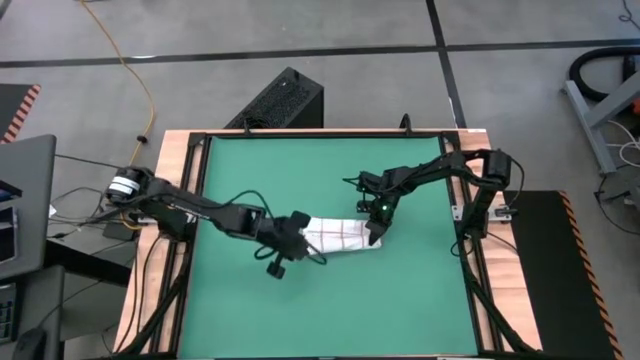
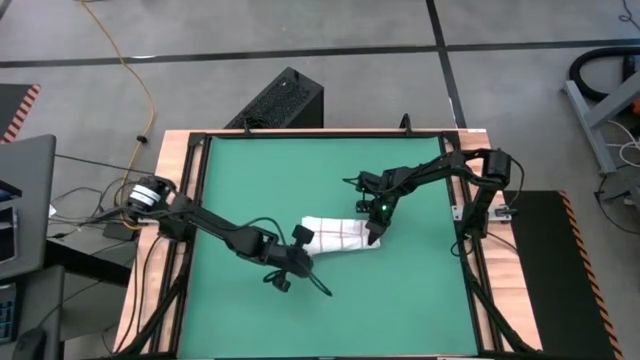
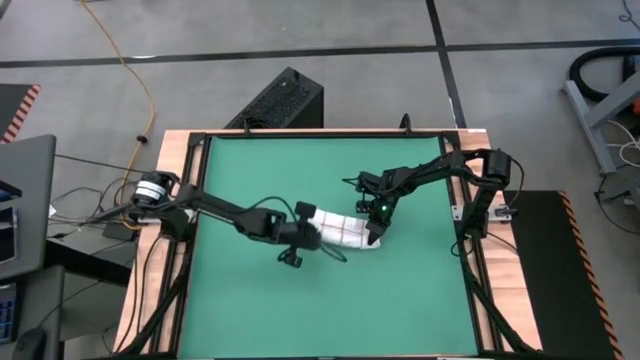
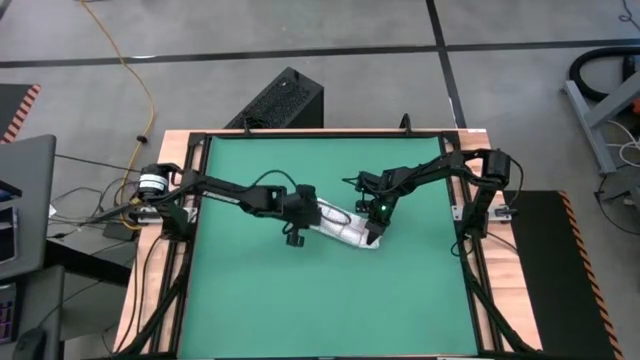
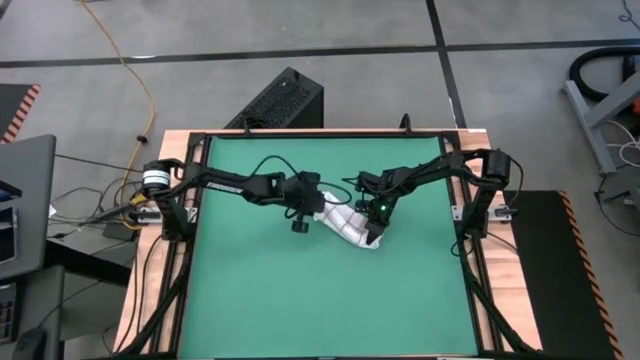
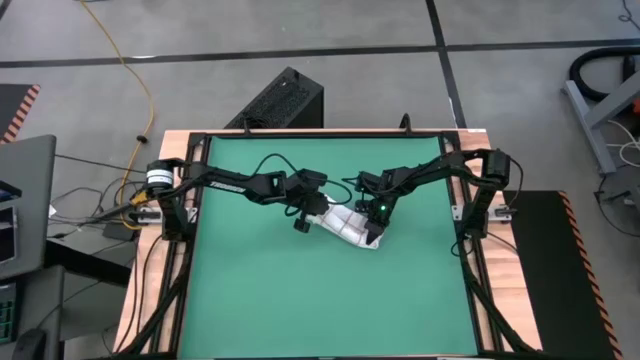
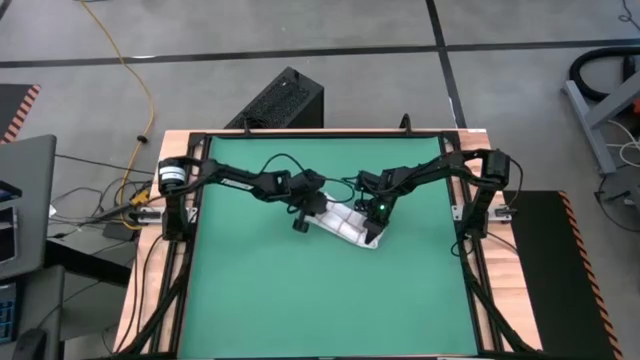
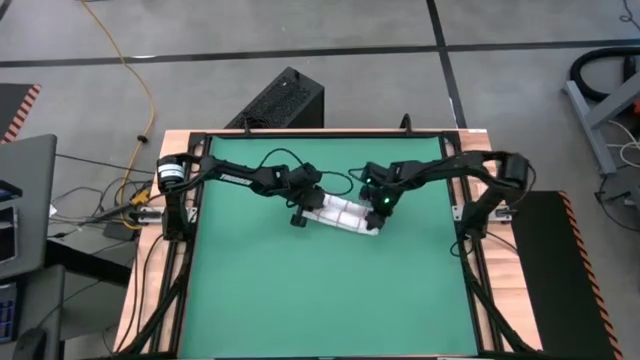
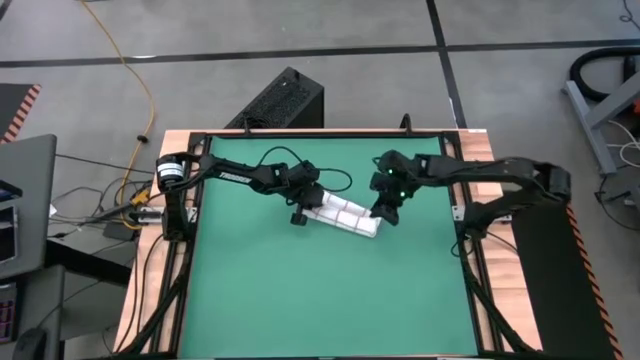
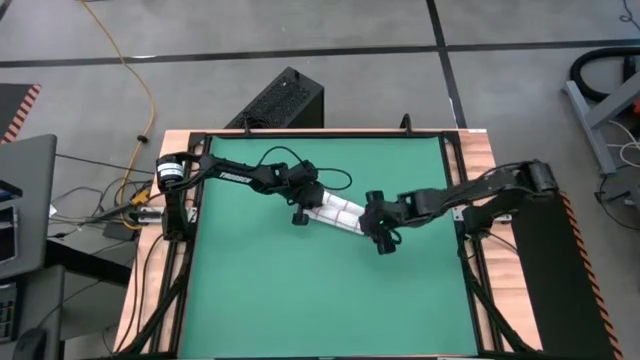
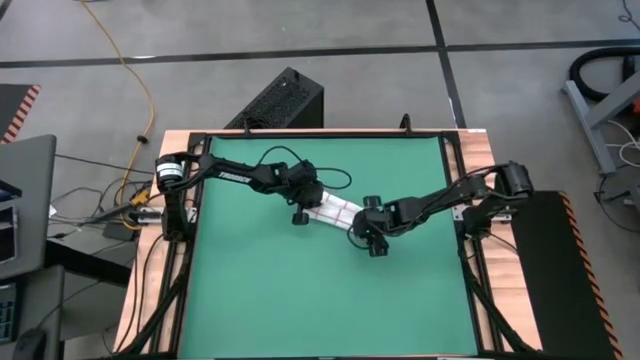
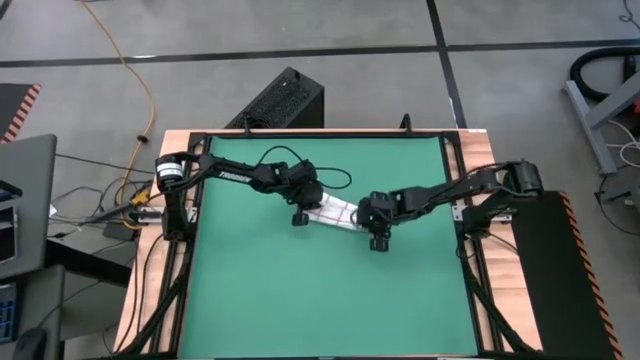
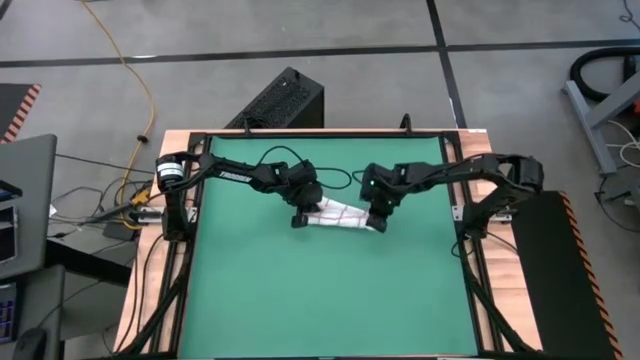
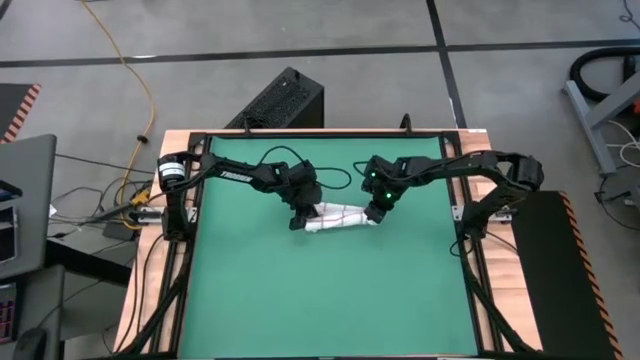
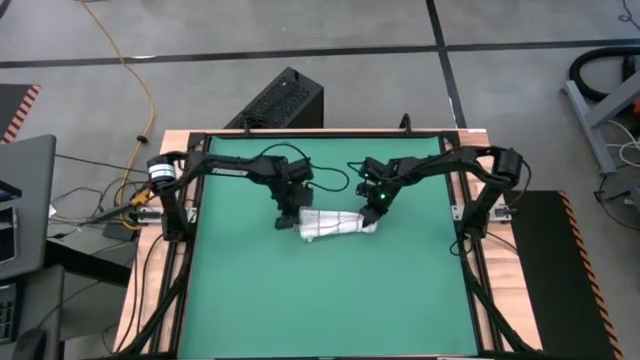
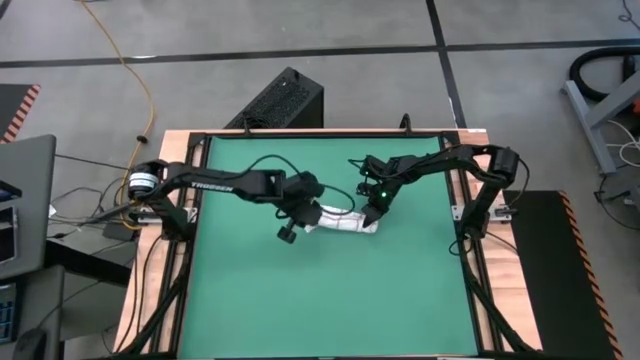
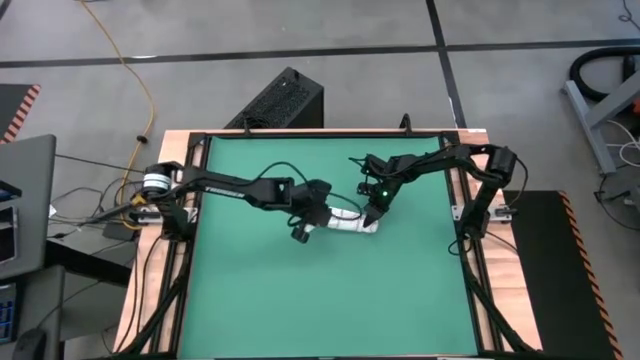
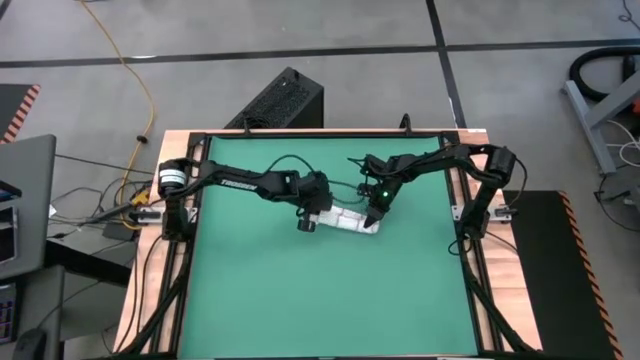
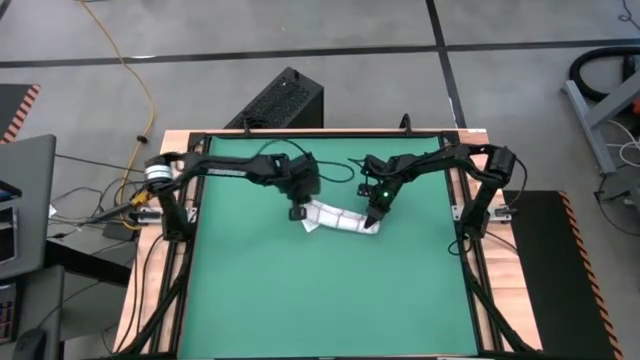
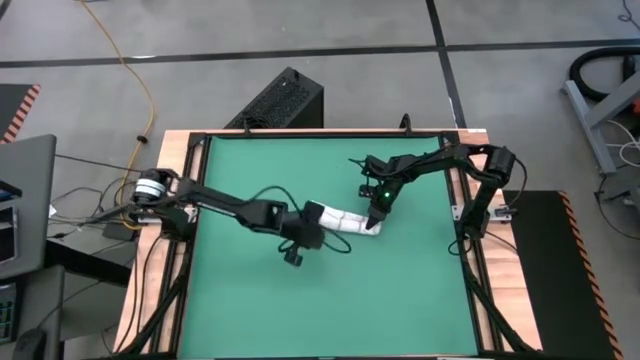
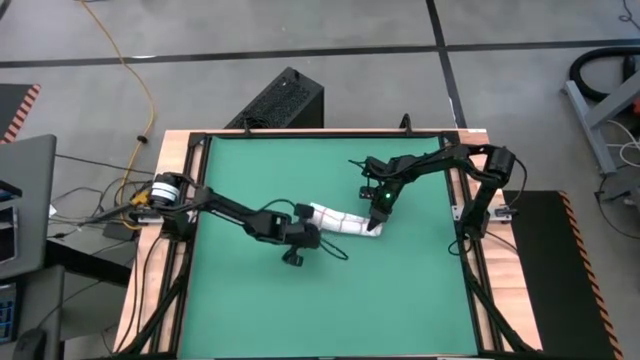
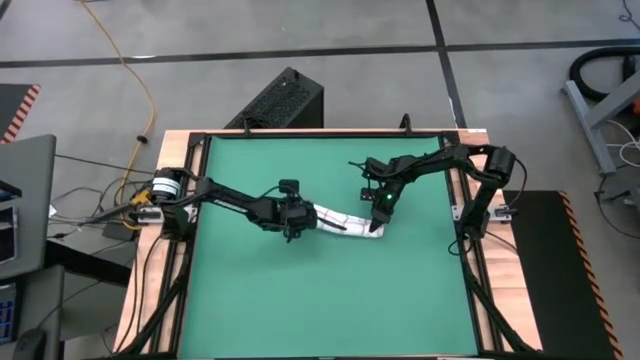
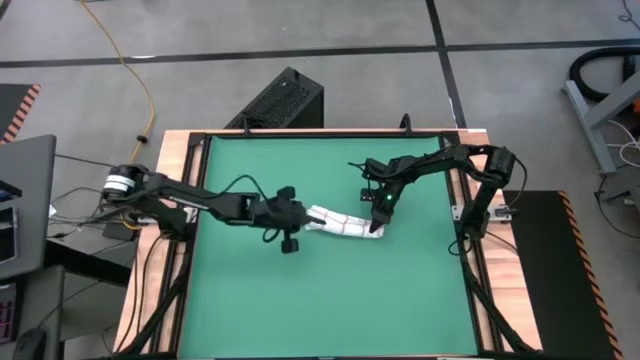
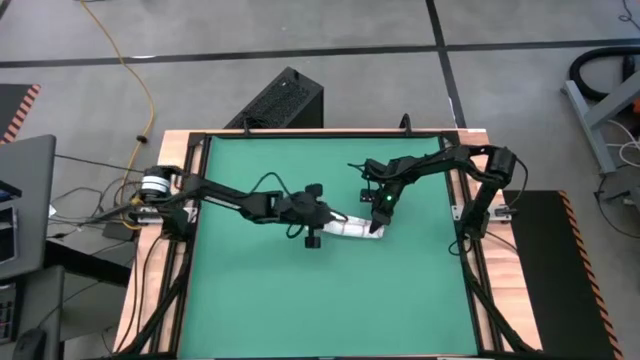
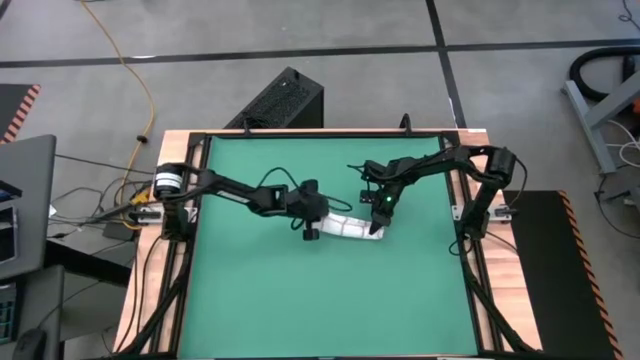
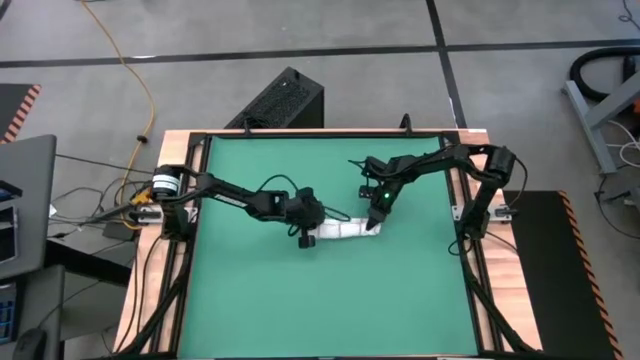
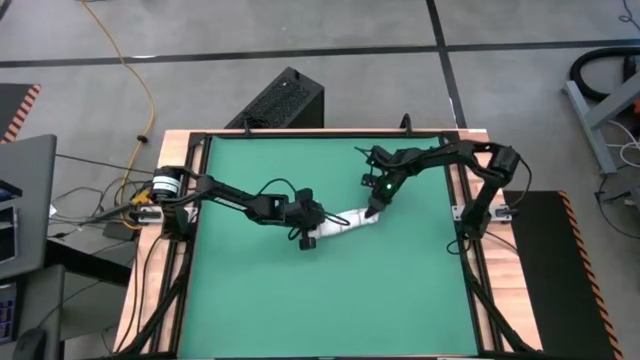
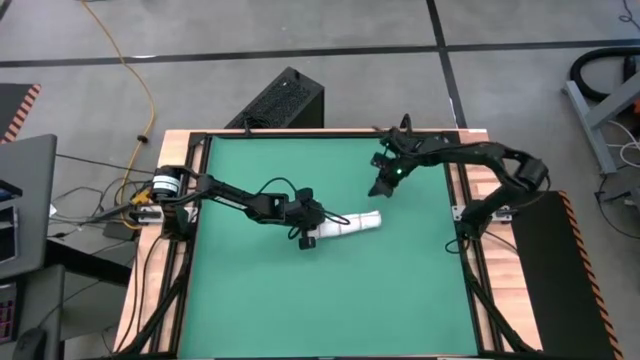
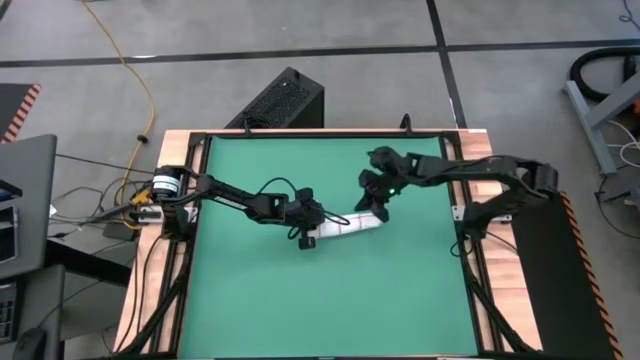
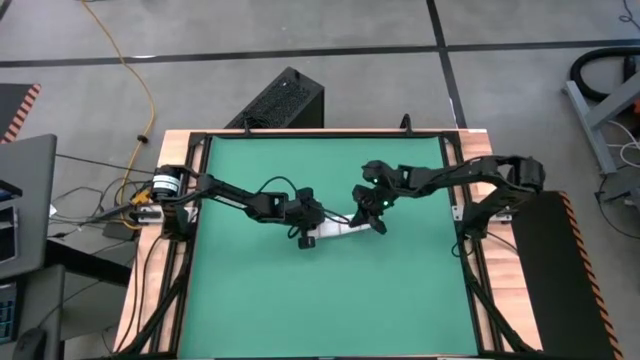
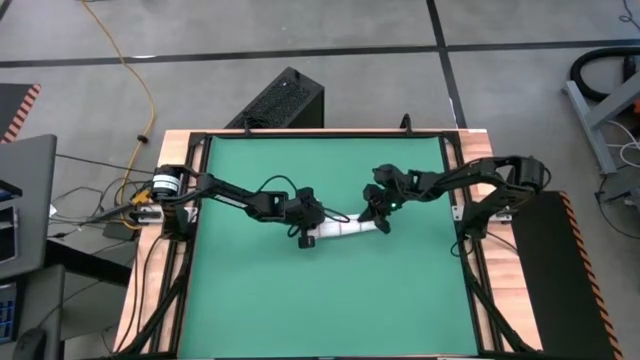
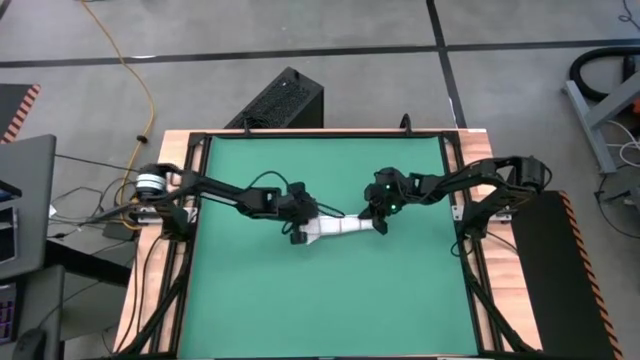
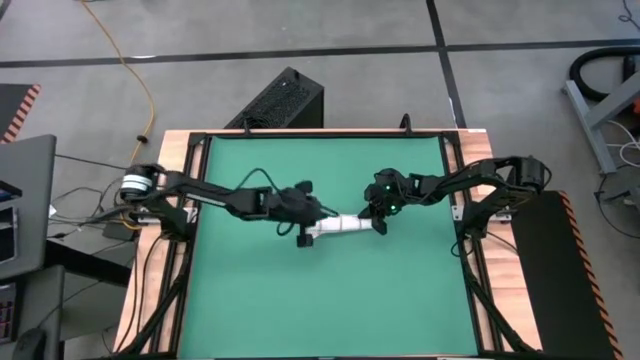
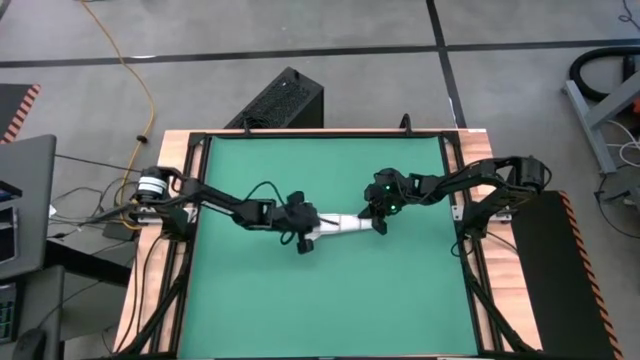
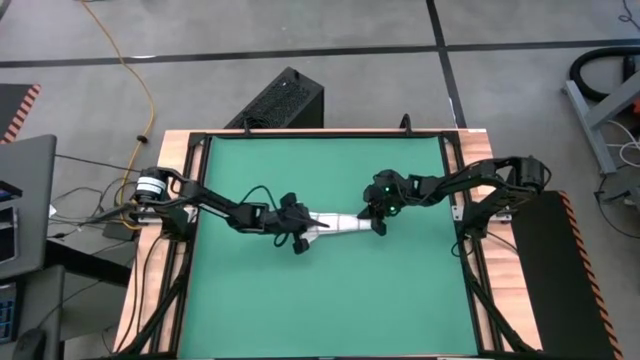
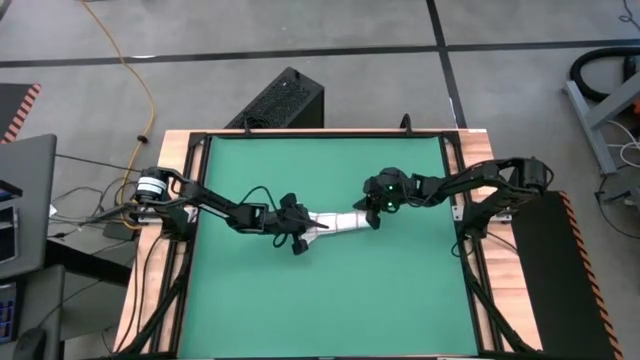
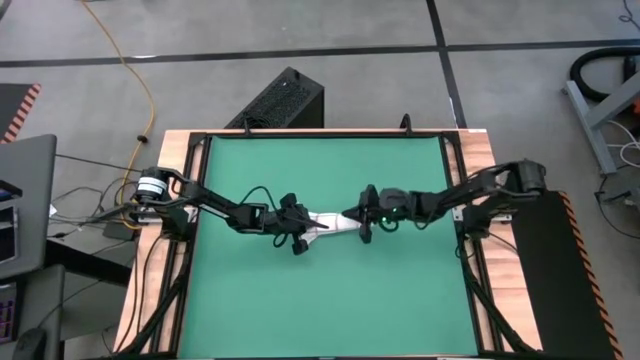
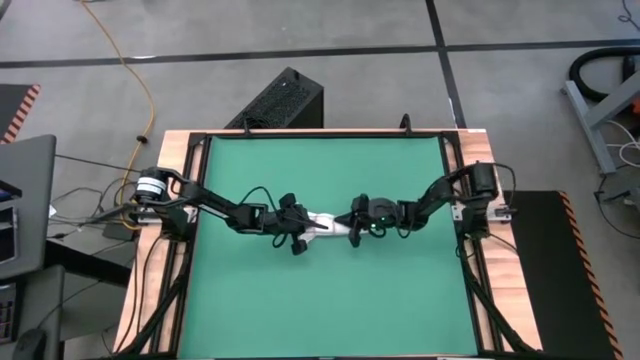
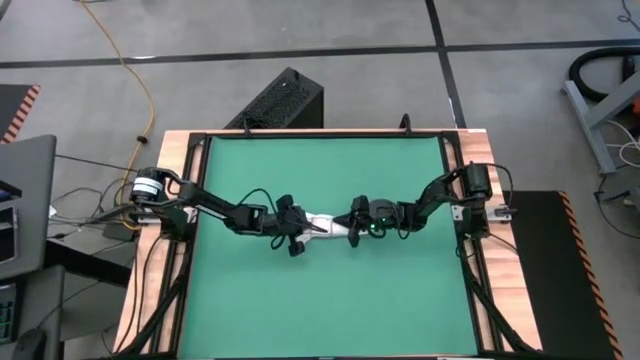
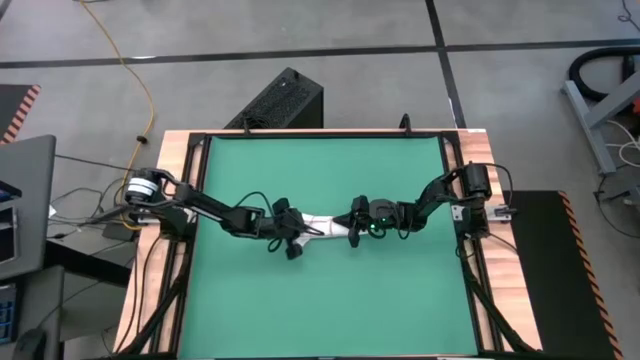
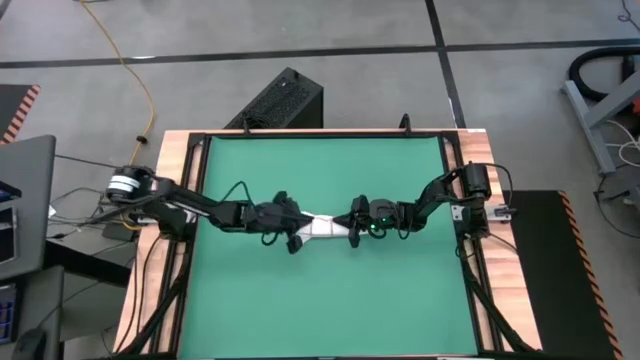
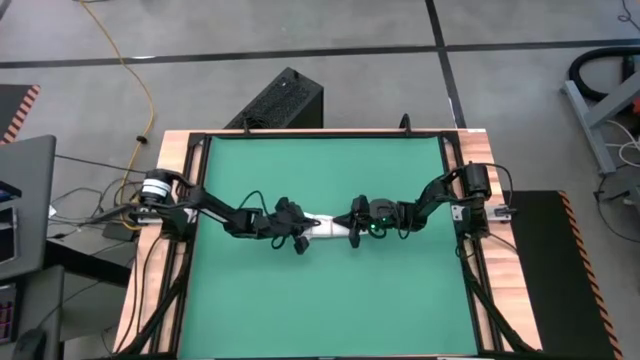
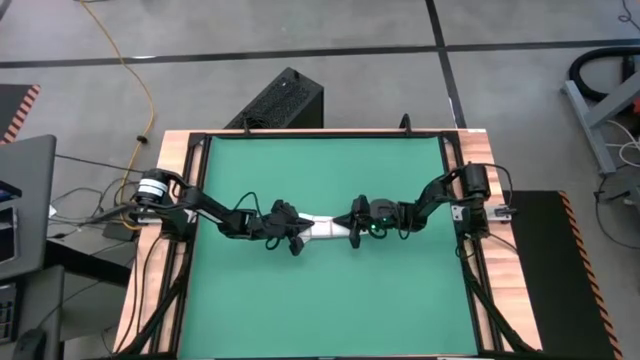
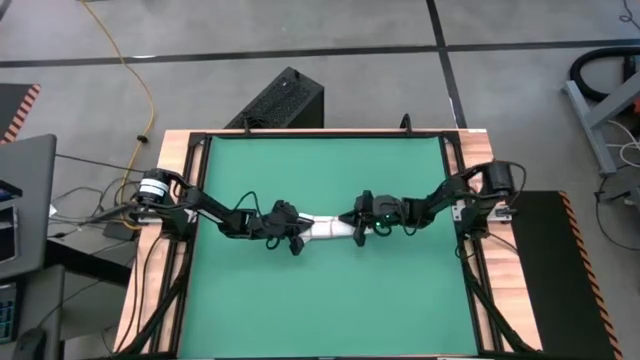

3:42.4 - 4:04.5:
Task: Roll towel into tight, uniform cylinder
Roll the white patterned towel
